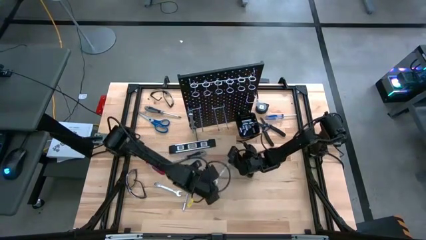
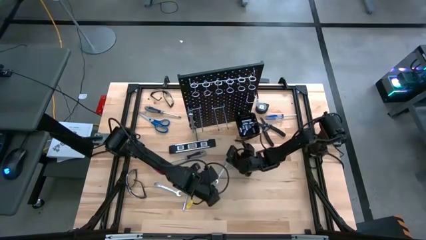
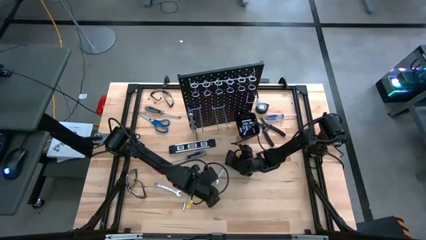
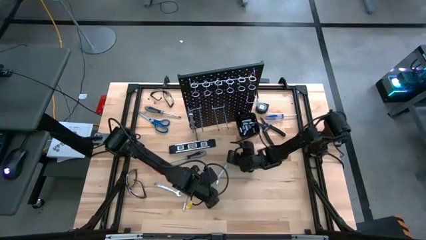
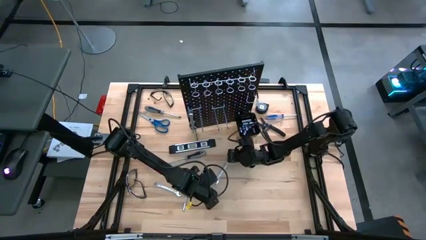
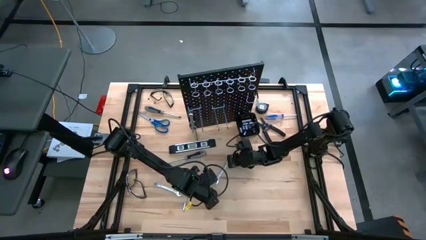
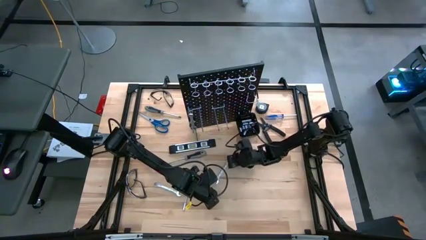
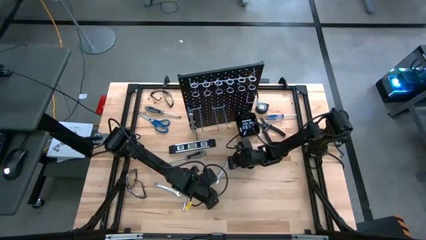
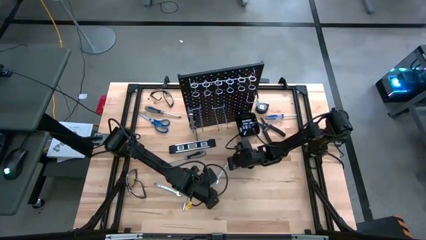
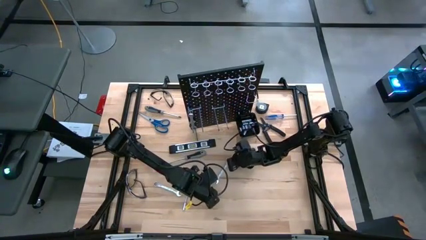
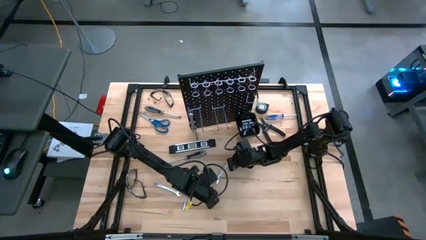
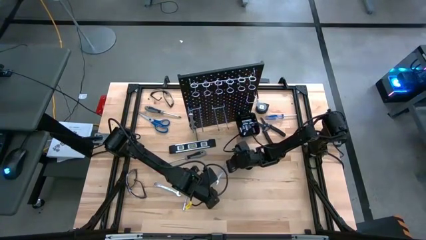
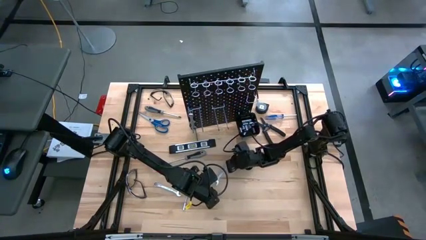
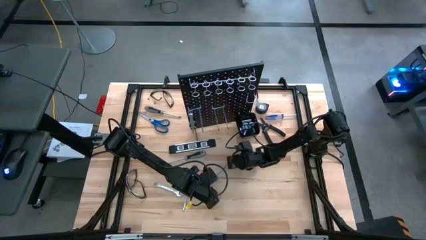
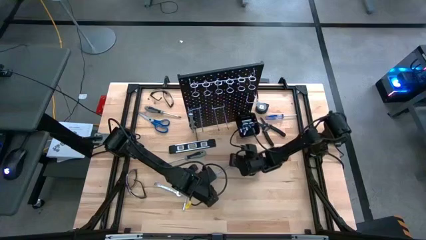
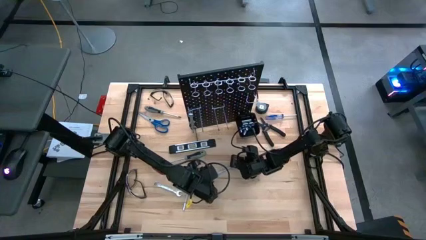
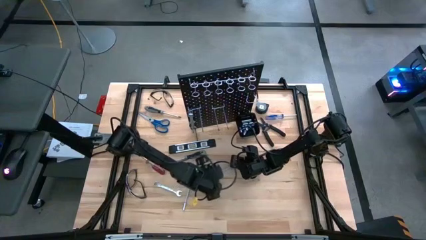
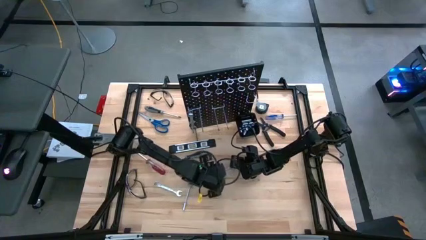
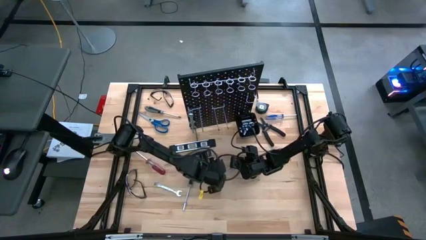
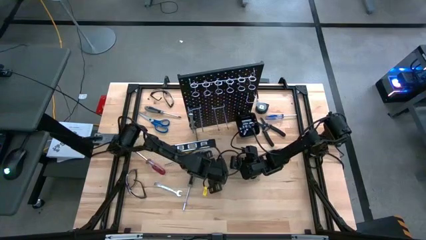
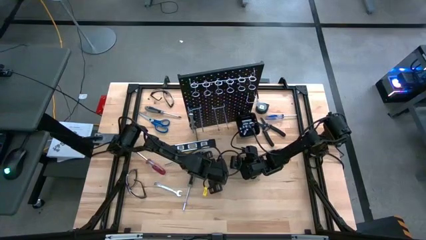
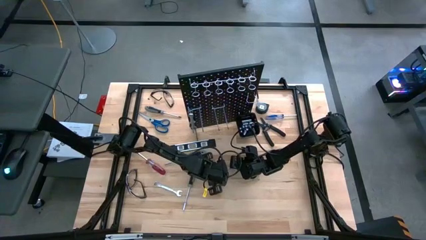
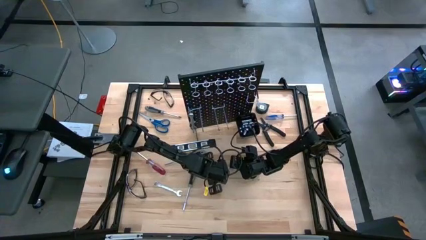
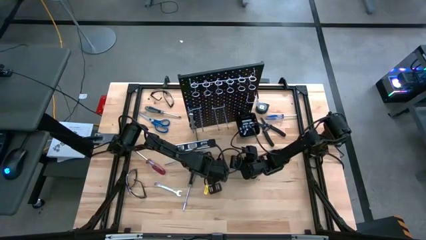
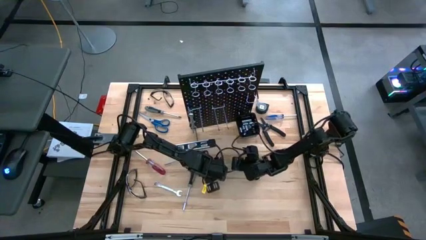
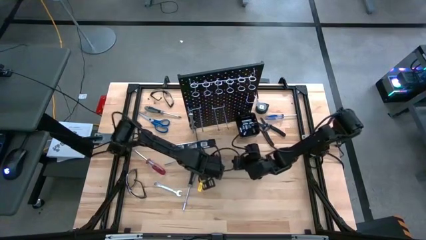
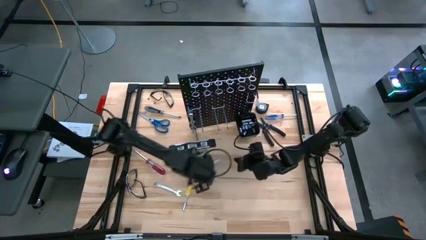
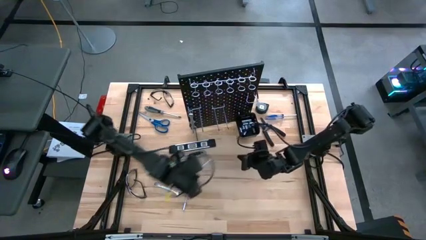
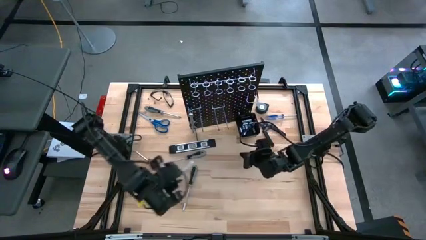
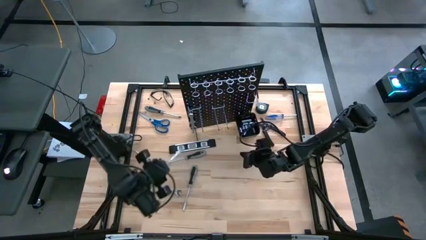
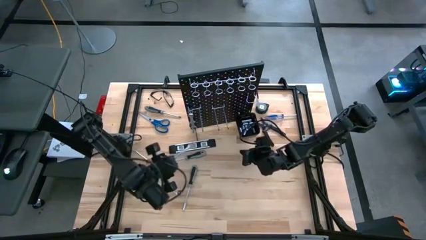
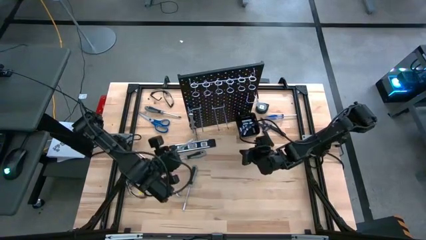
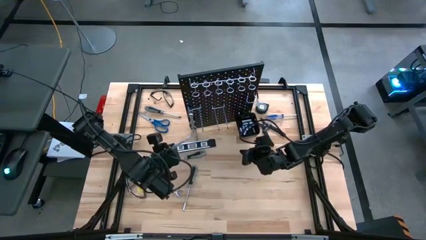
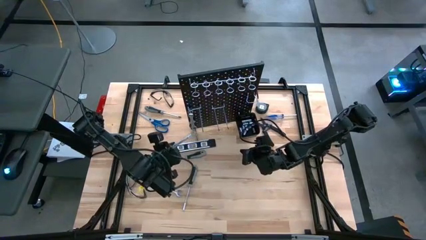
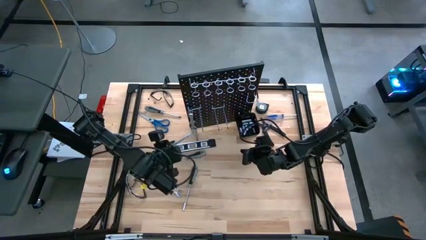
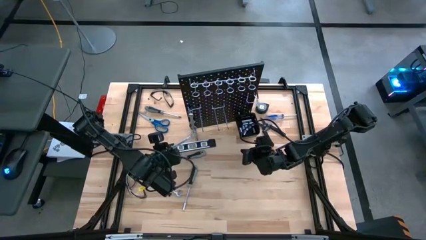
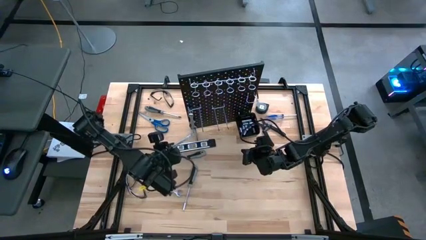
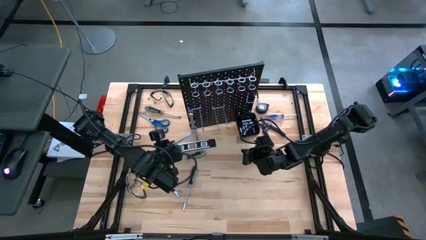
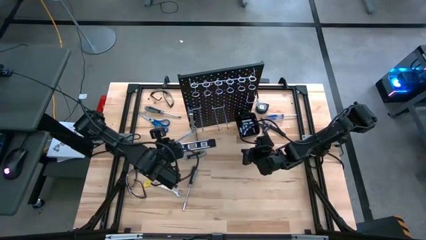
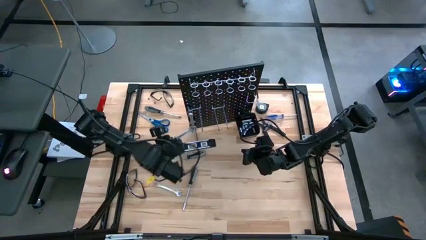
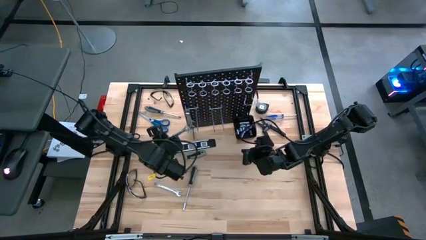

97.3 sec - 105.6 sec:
Task: Hang tools onto peg board
Hang the silver wrench on the pegboard

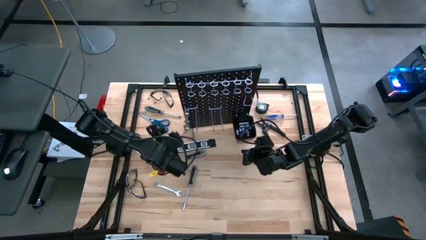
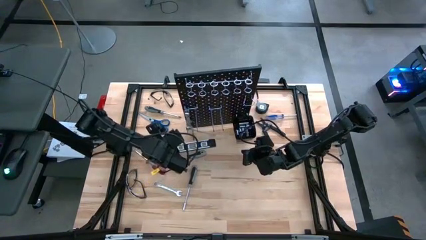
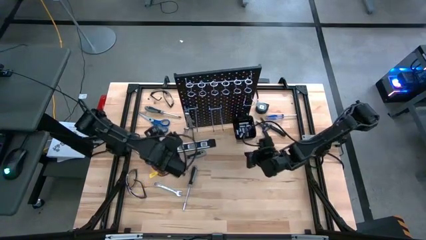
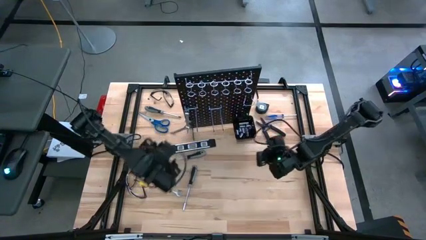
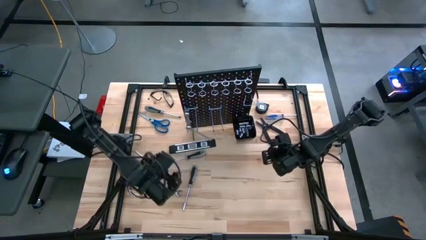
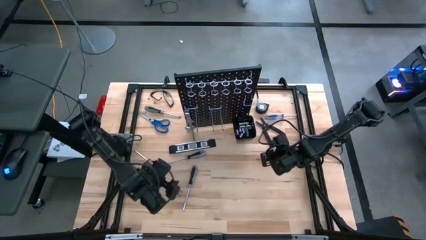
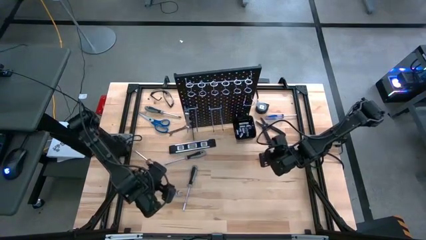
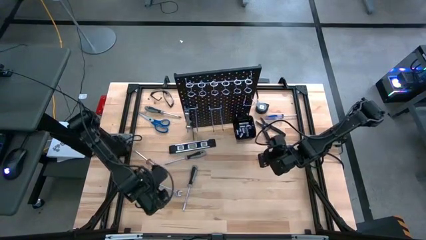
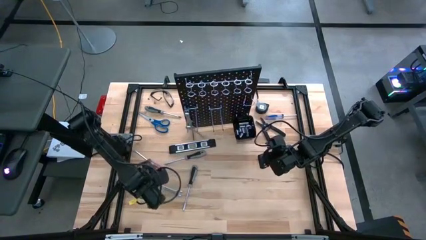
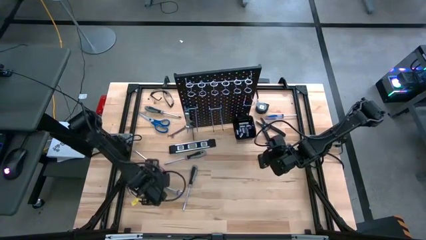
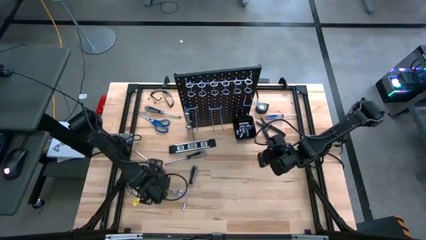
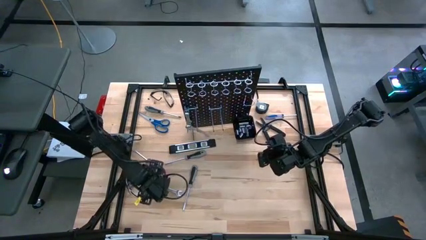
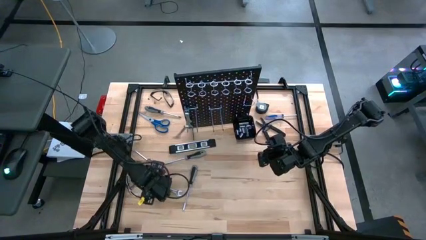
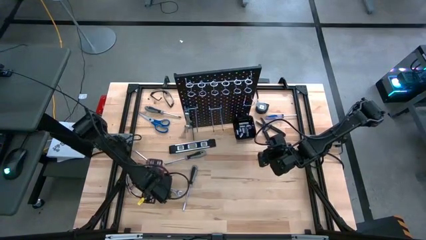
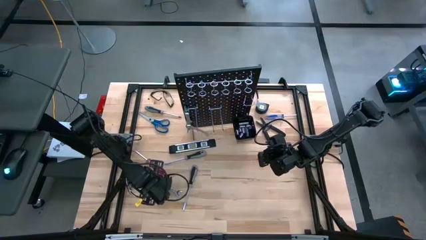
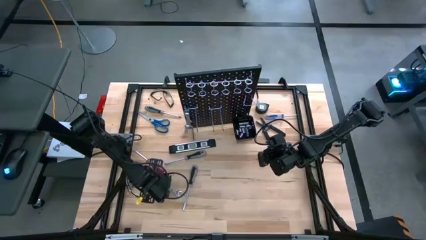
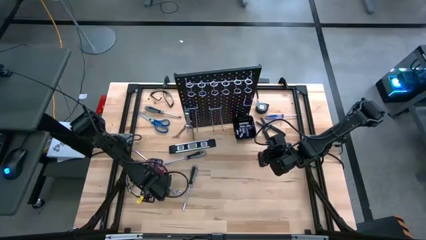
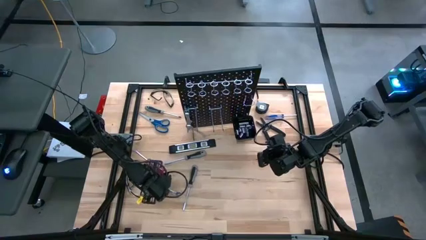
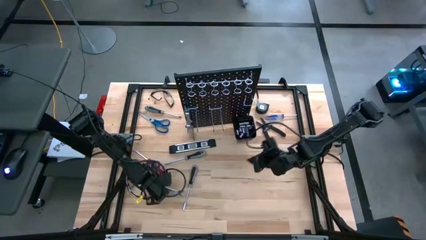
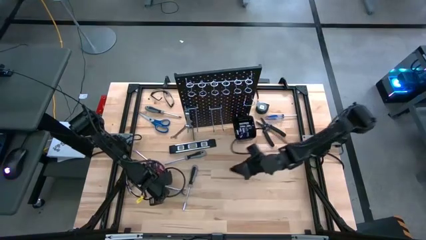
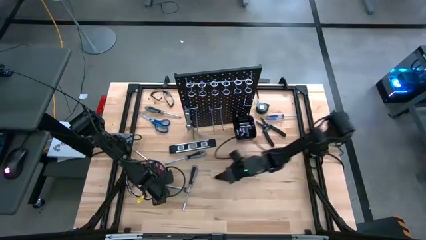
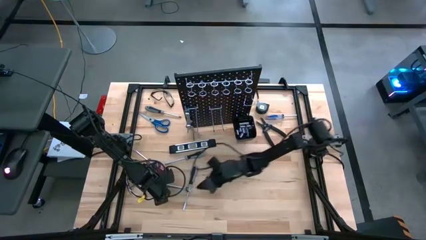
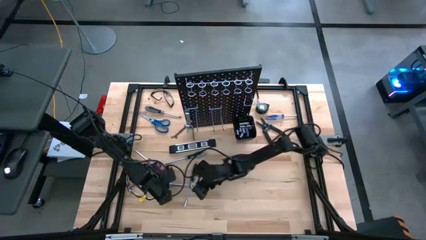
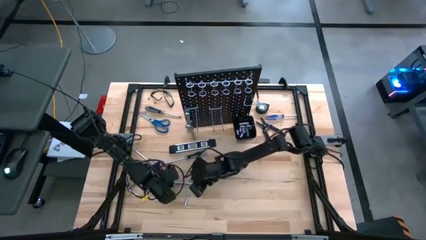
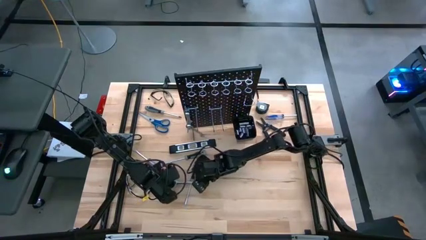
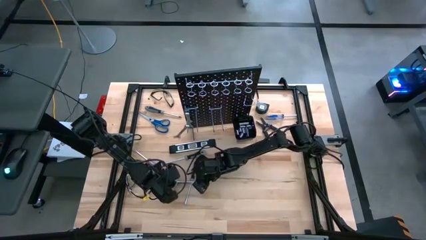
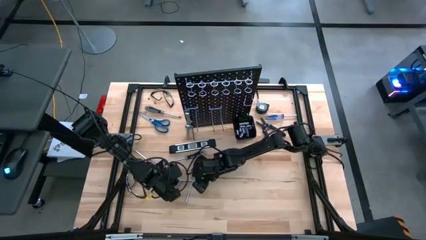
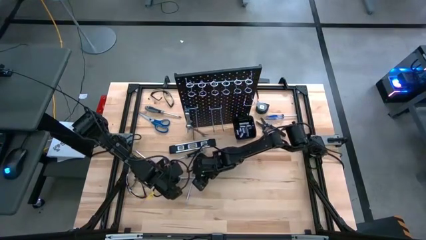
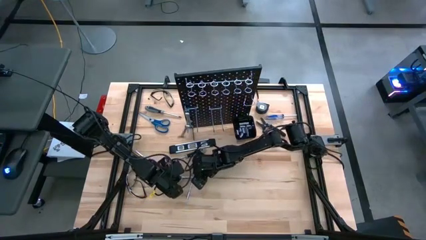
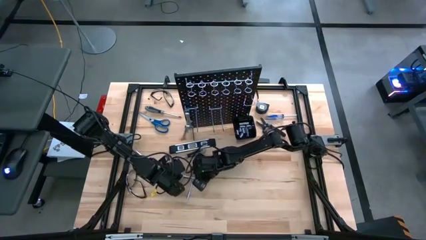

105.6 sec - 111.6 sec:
Hang the silver wrench on the pegboard

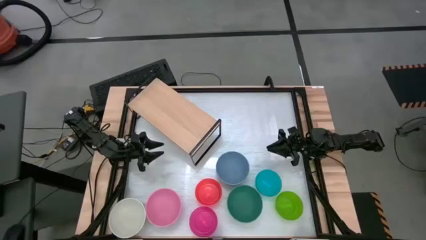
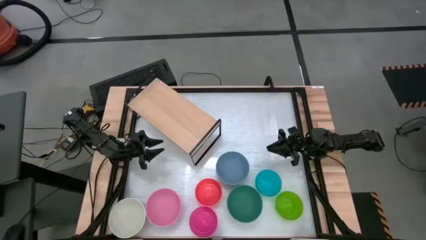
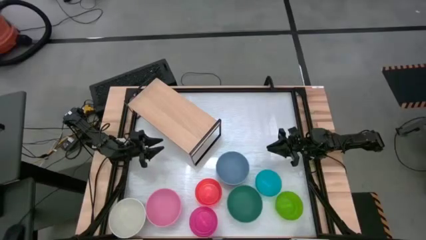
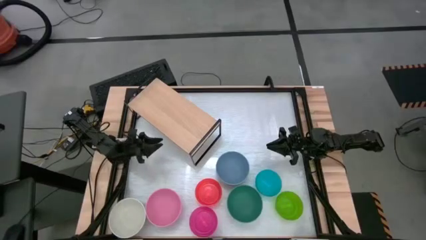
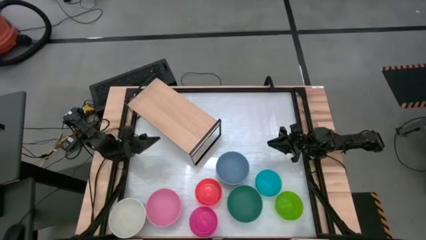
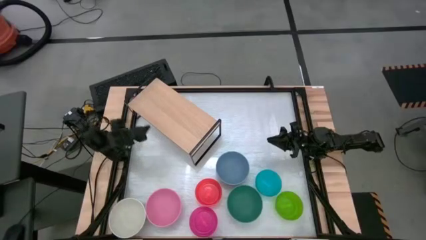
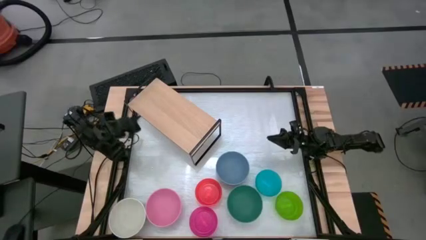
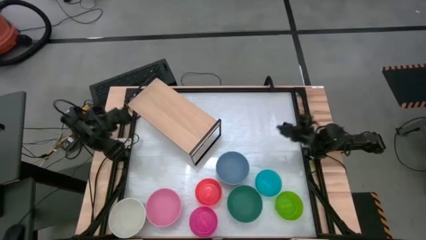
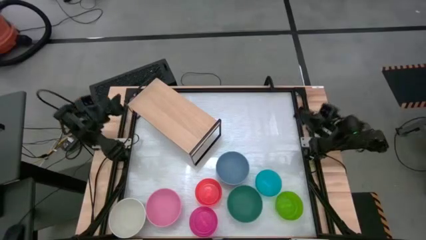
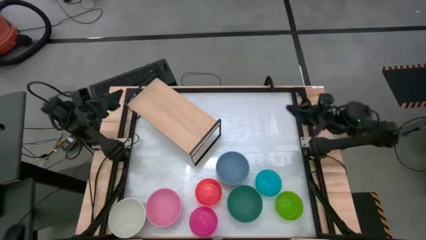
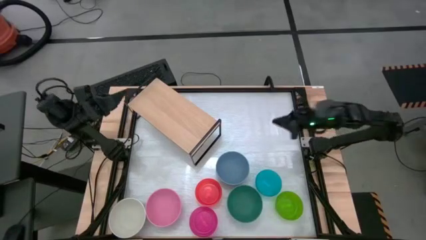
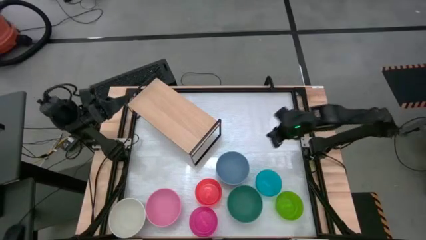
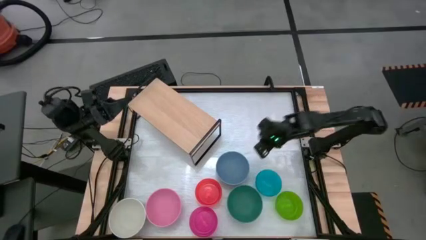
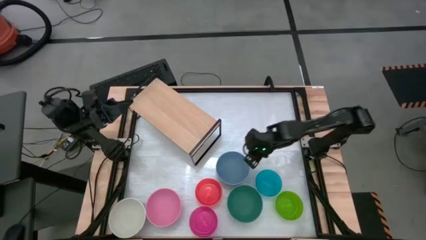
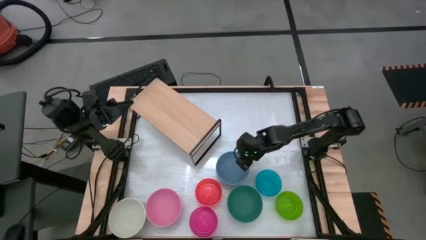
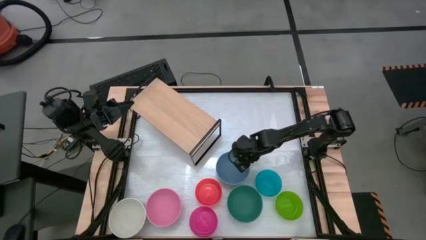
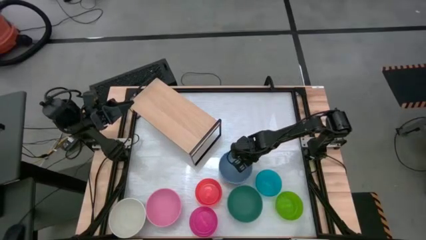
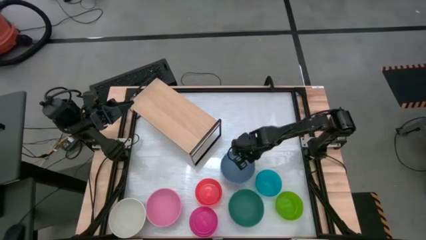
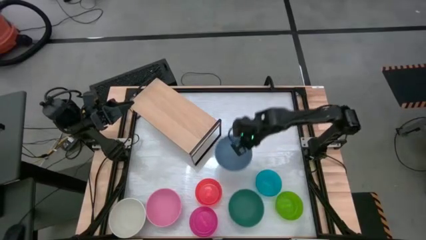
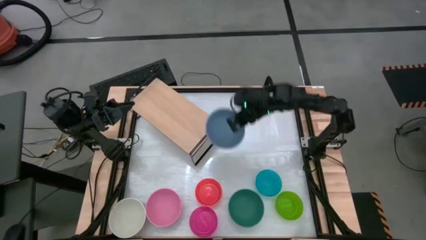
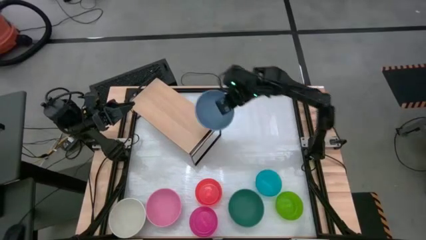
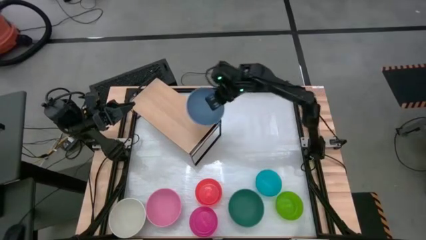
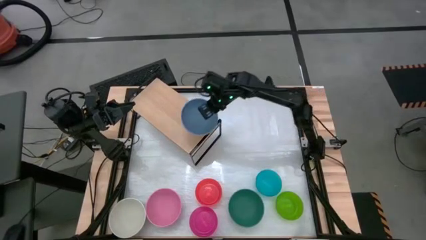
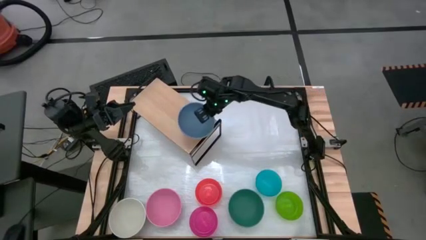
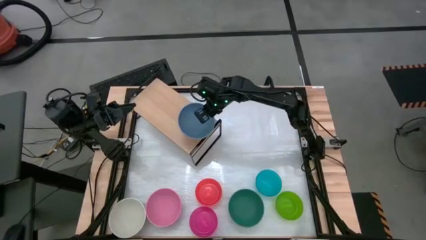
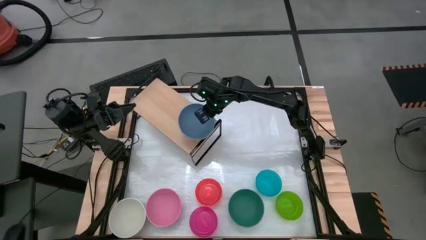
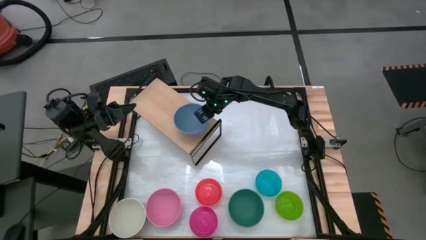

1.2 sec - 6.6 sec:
Task: Place and stack bowls onto a shelf
Put the blue bowl on the shelf
